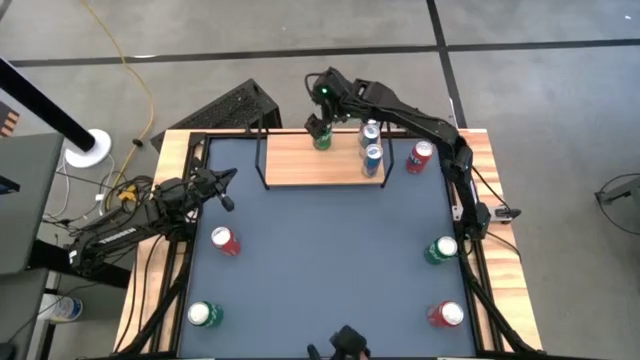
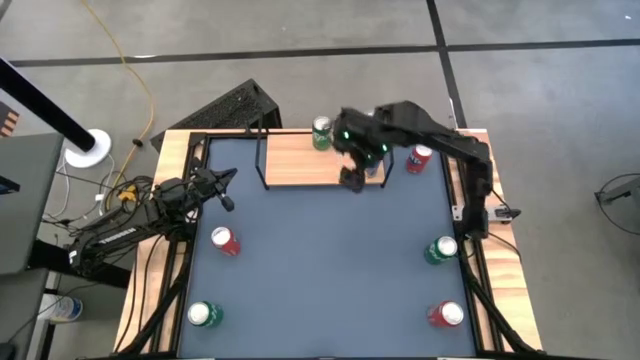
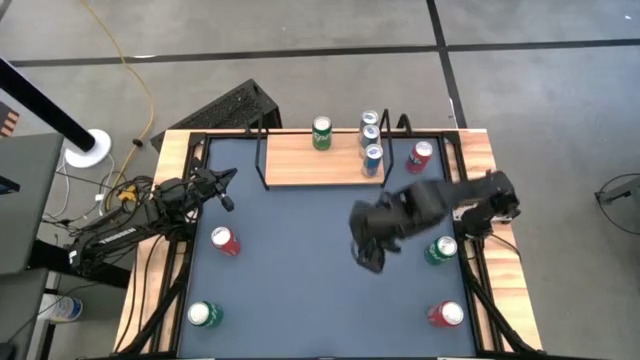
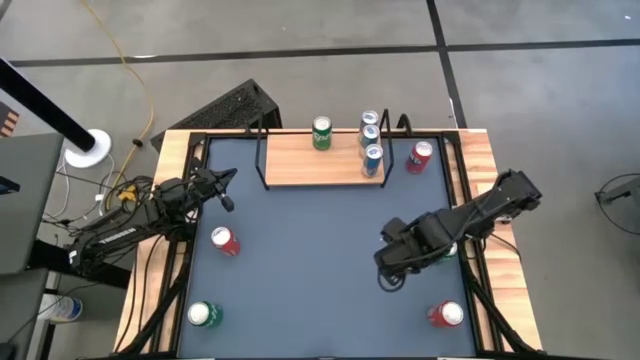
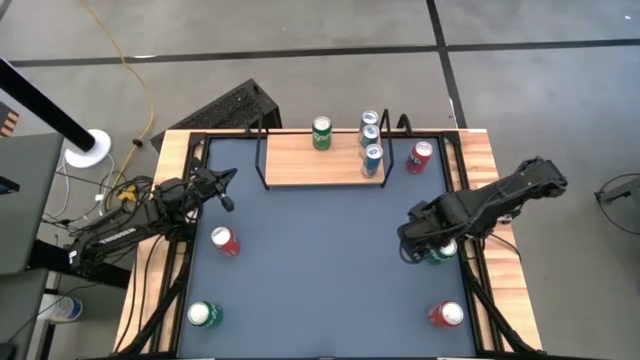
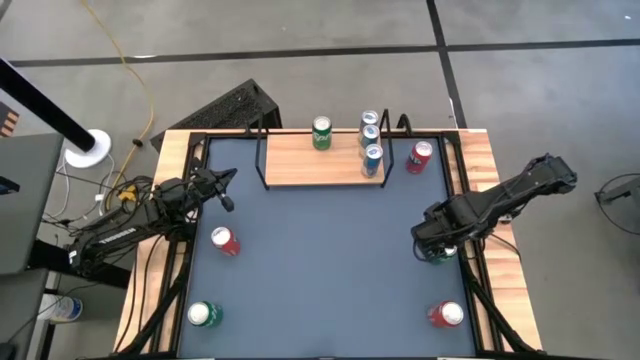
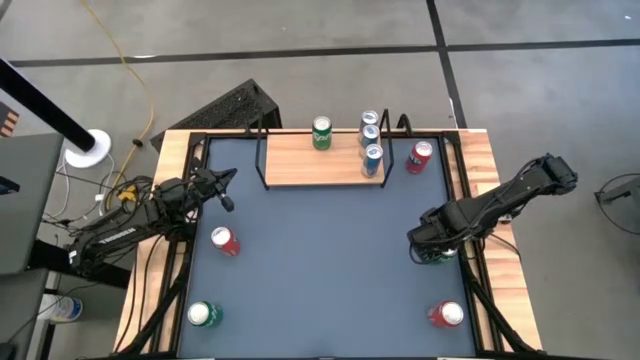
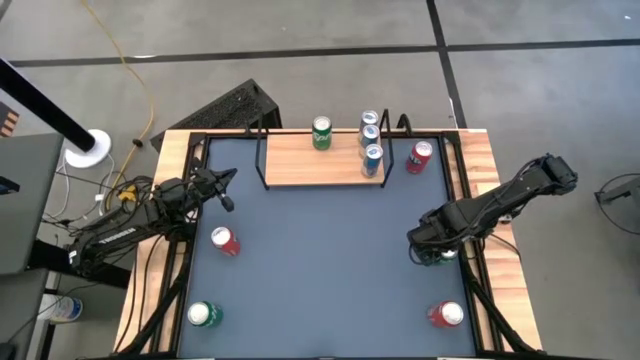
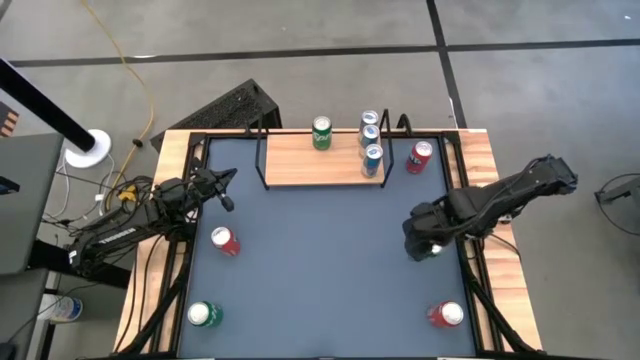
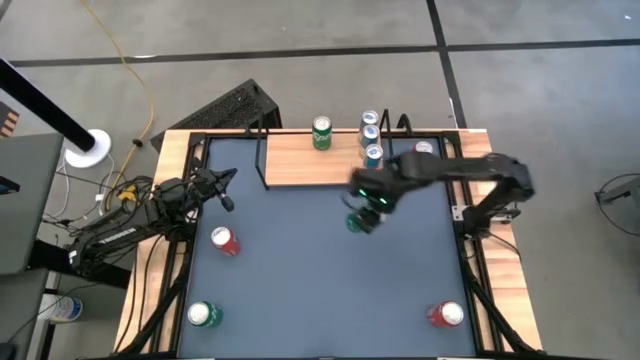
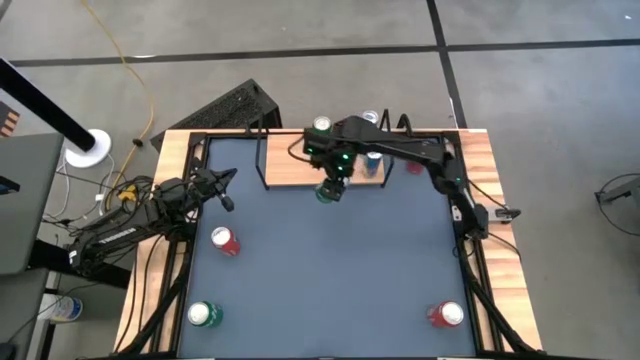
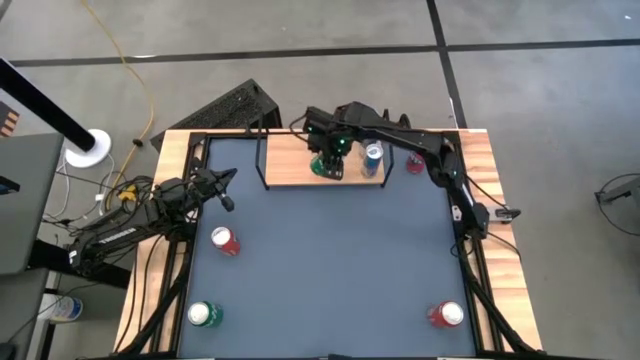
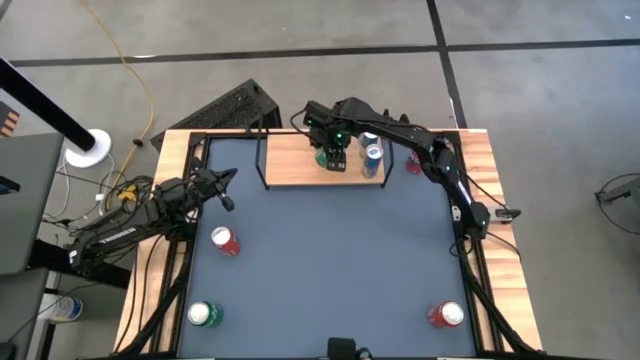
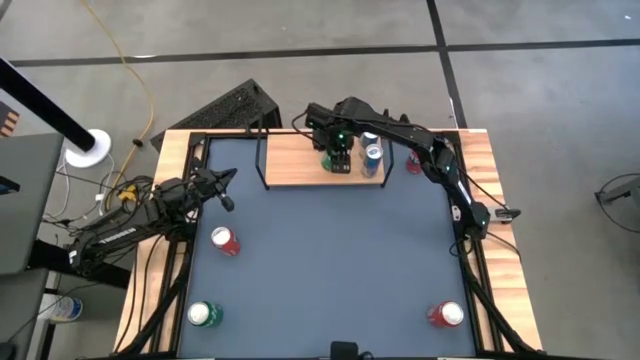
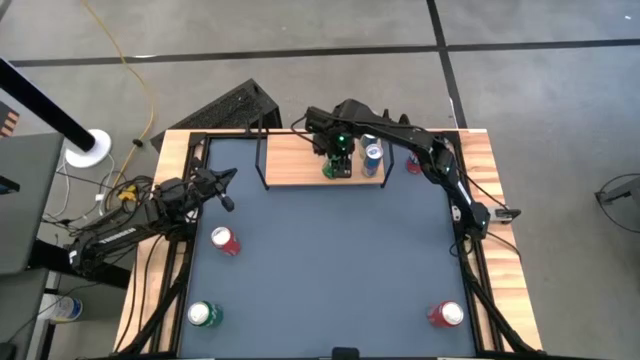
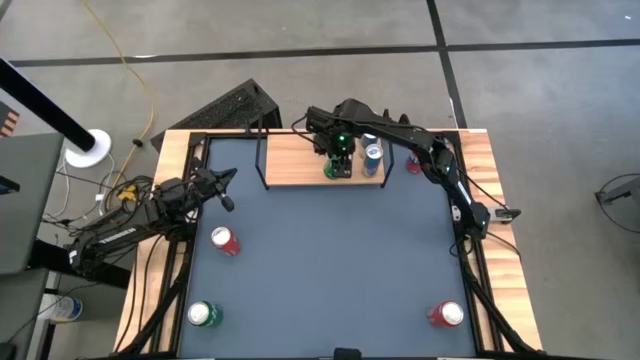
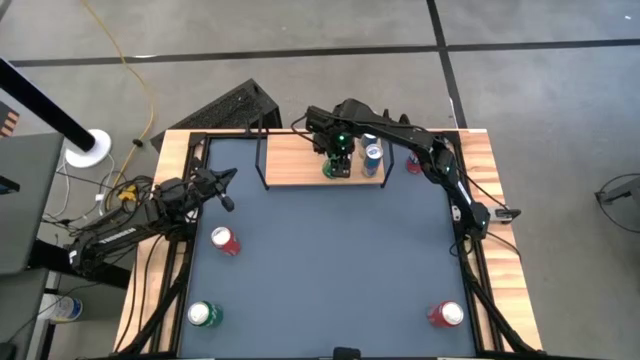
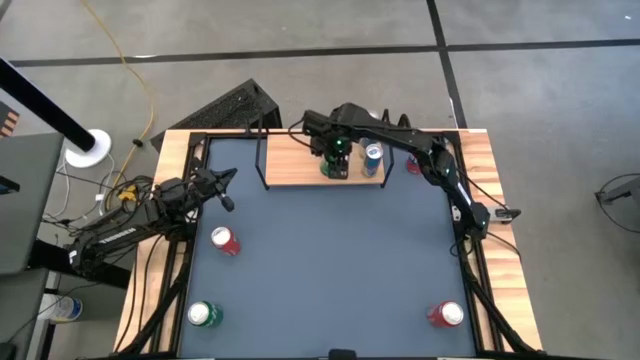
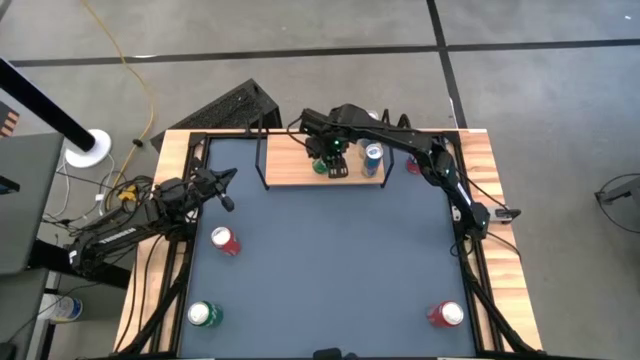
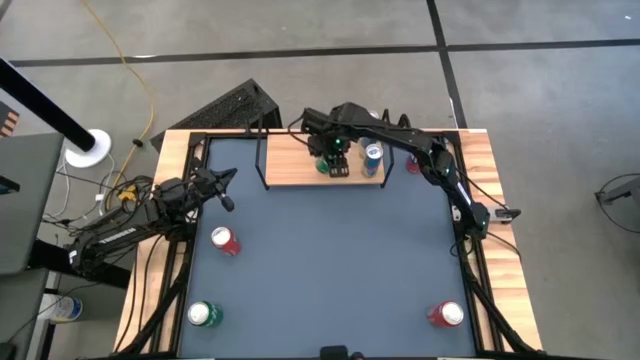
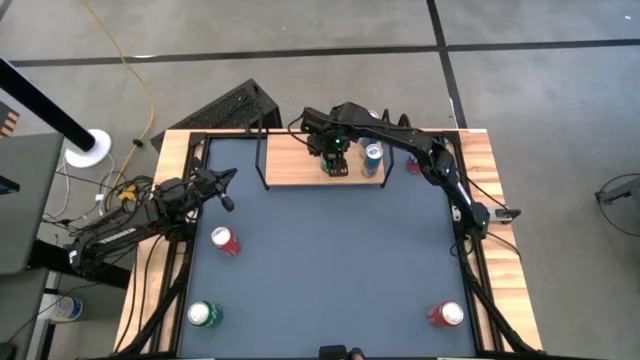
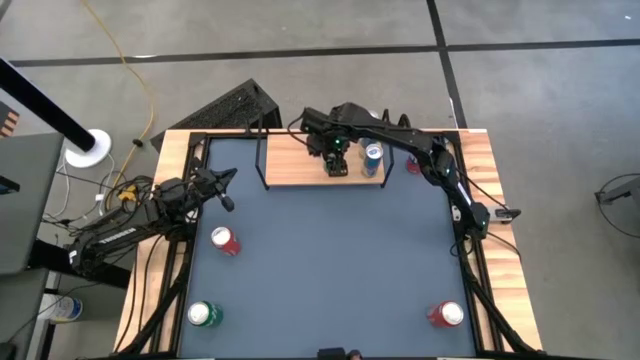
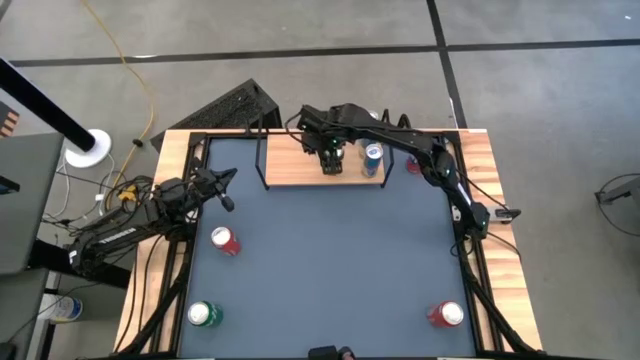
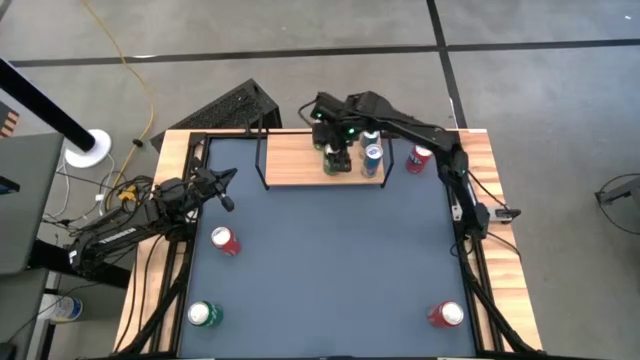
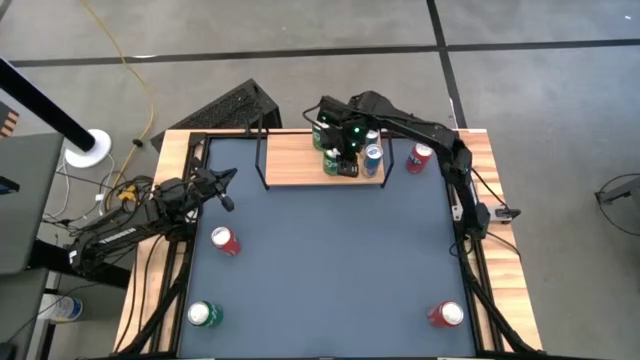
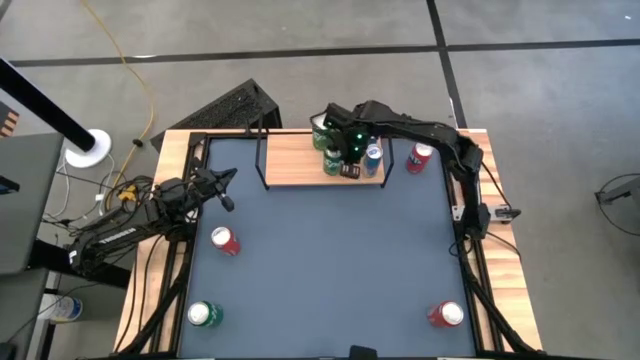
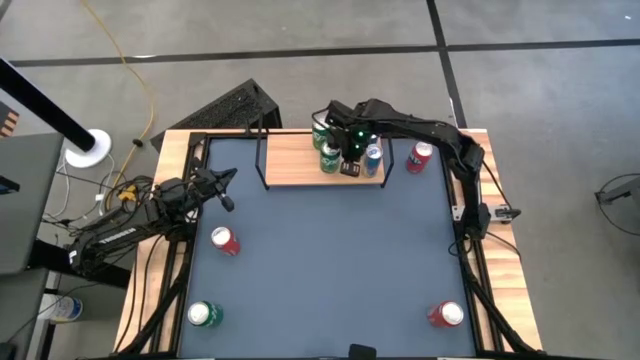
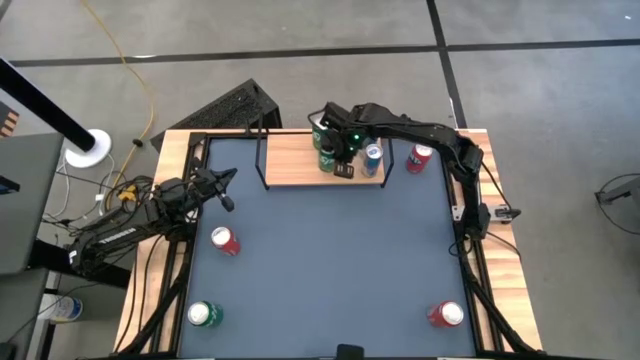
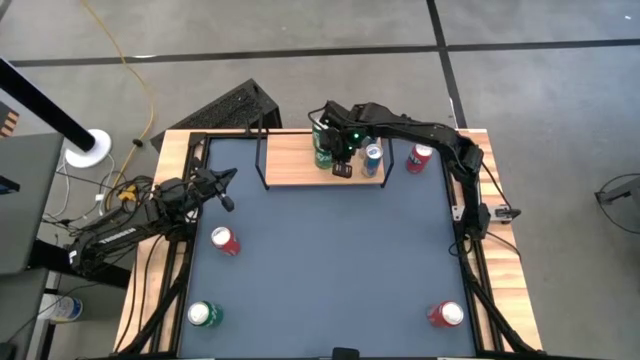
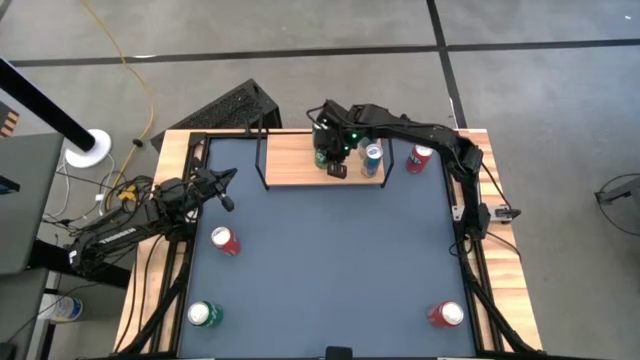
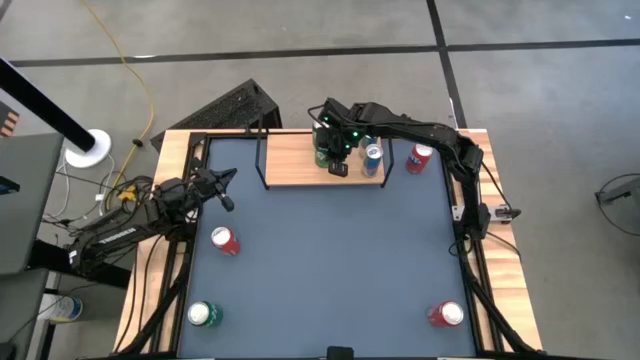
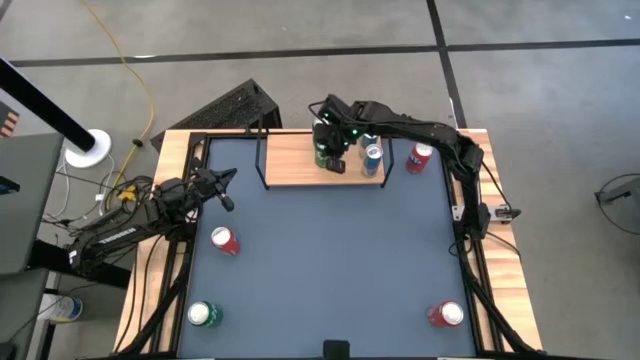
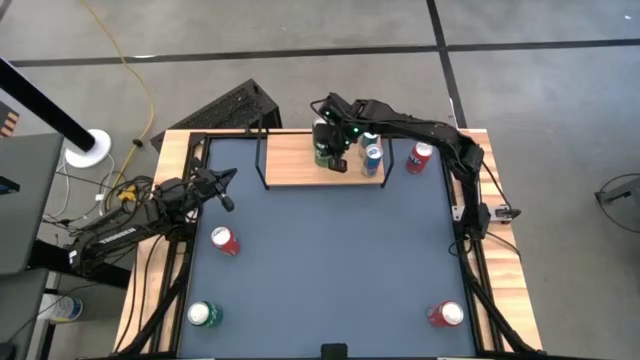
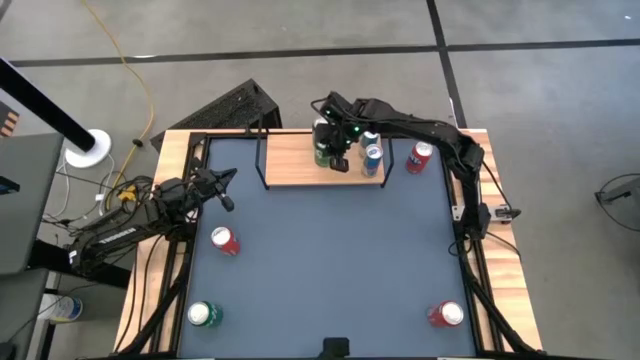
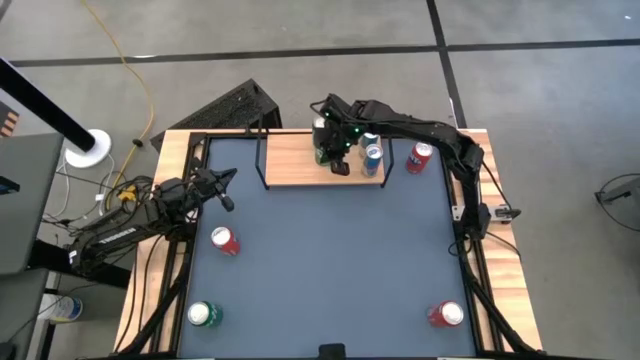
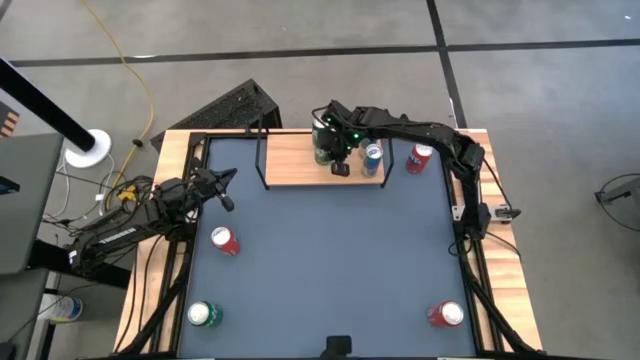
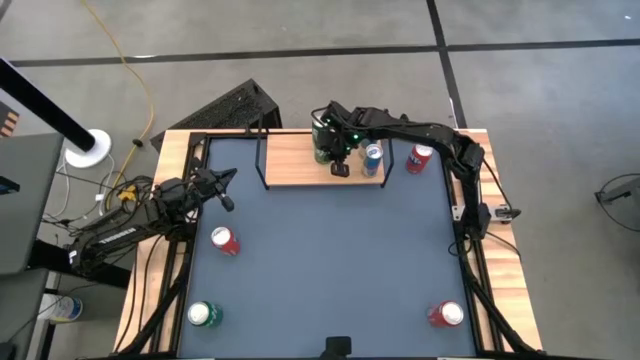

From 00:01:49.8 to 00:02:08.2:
Task: Place canned beverage on shelf
Put the top green soda can on the shelf aligned with the other green soda can

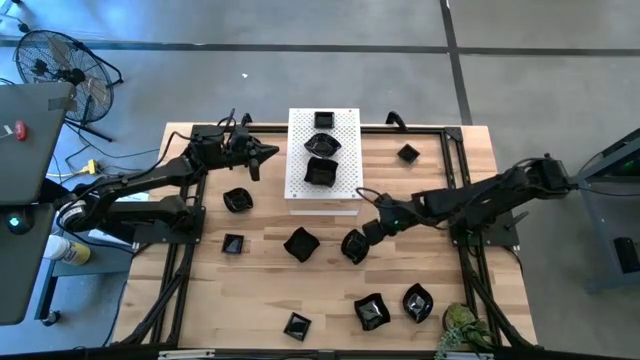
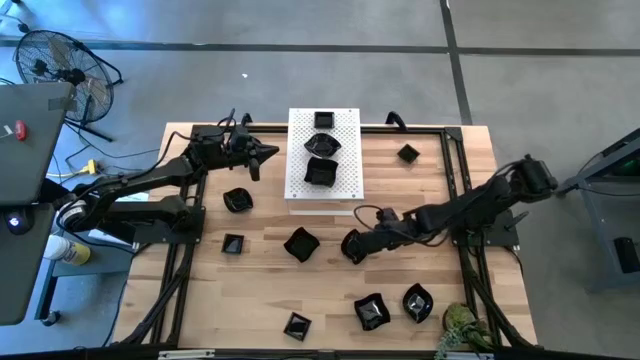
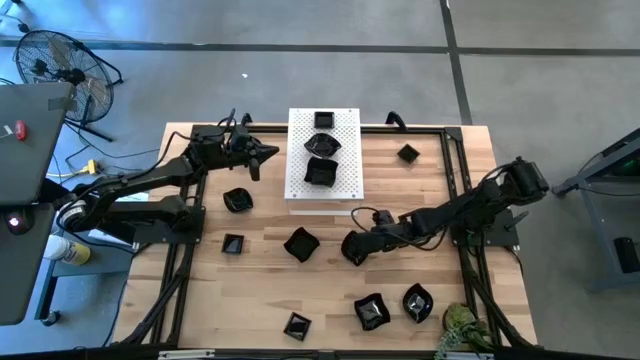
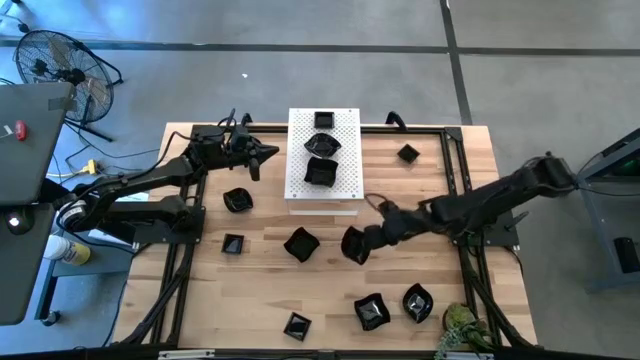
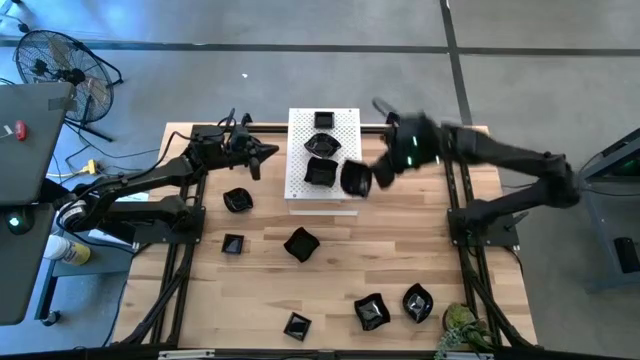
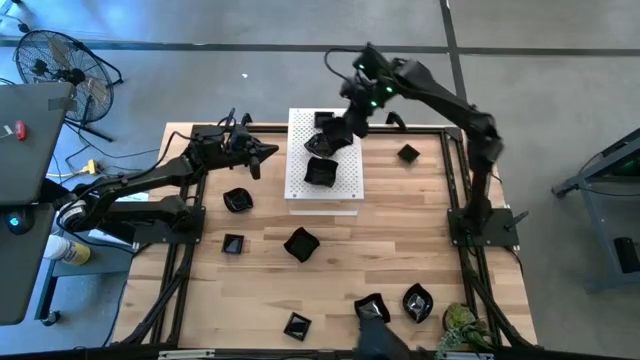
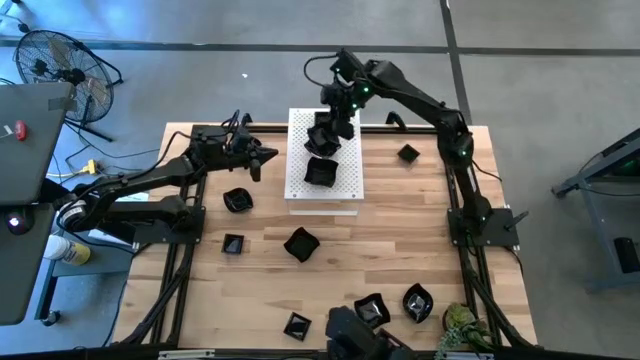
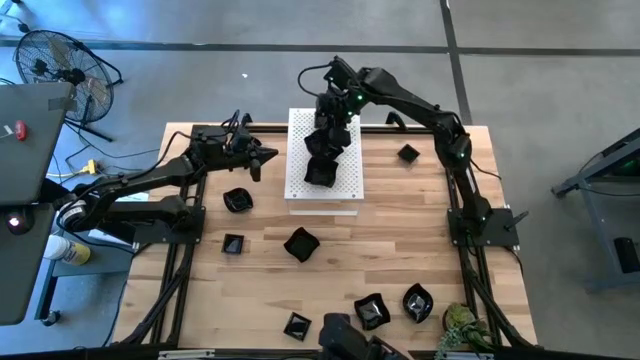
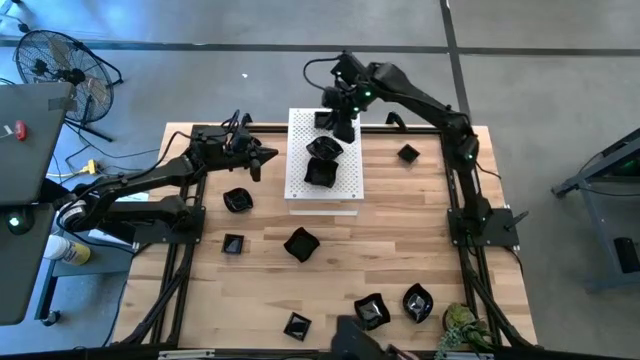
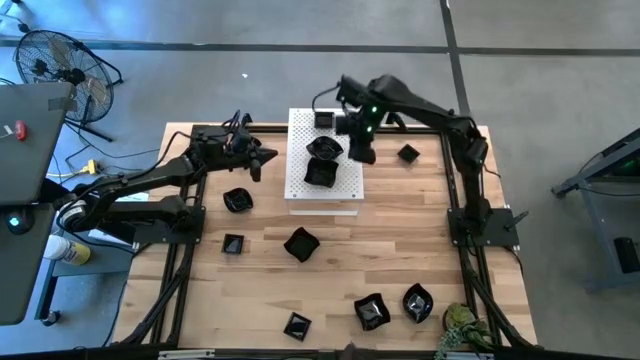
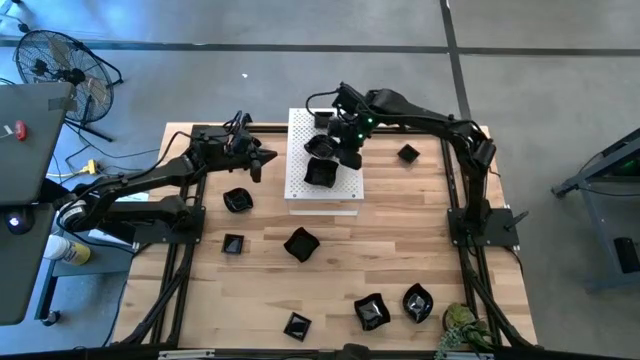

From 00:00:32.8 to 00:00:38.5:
Task: Pick & Place Mini shaped plates
Stack the black leaf shaped plate on top of the black leaf shaped plate on the shelf
